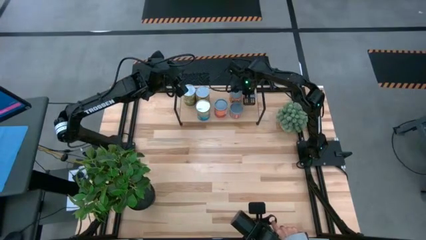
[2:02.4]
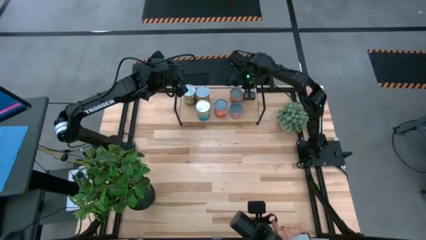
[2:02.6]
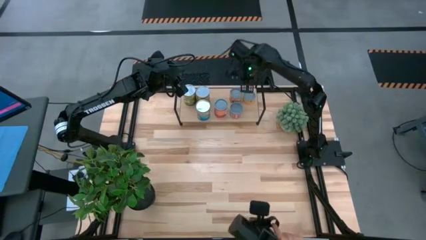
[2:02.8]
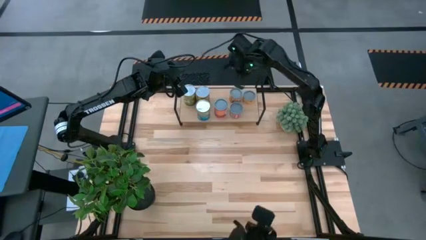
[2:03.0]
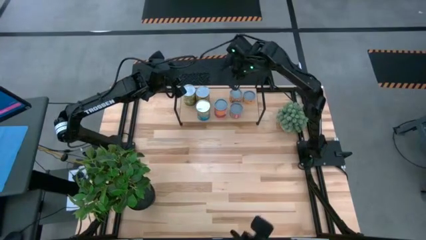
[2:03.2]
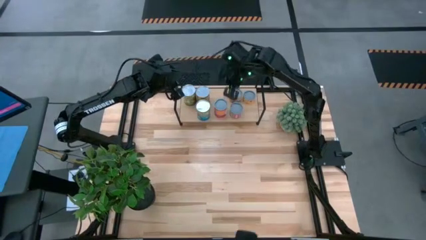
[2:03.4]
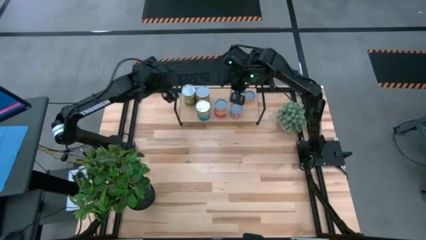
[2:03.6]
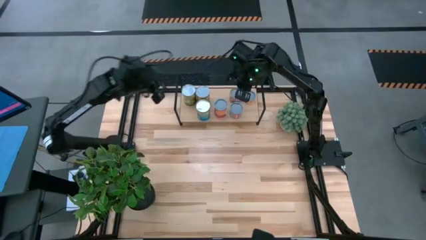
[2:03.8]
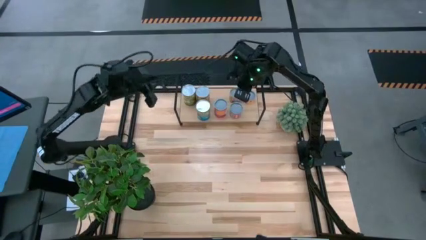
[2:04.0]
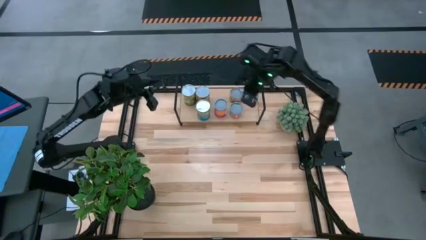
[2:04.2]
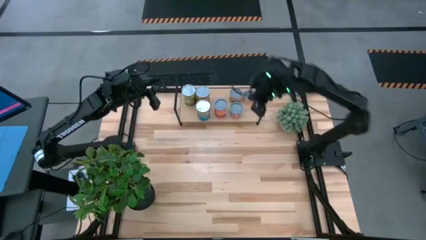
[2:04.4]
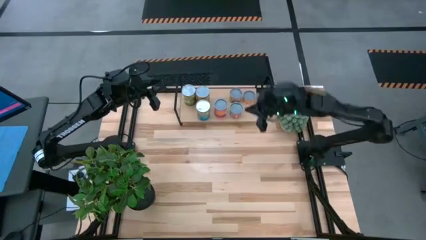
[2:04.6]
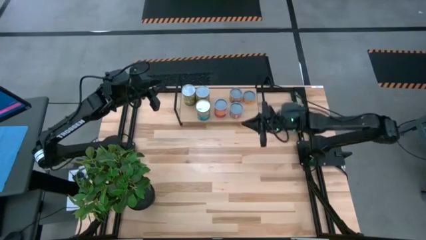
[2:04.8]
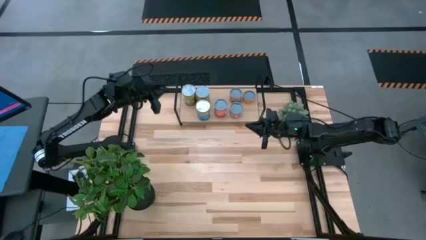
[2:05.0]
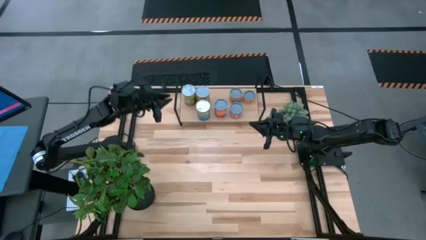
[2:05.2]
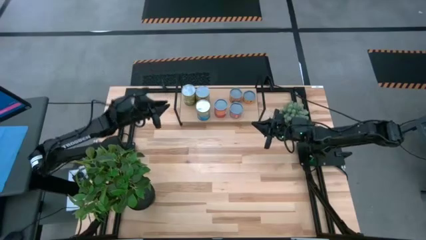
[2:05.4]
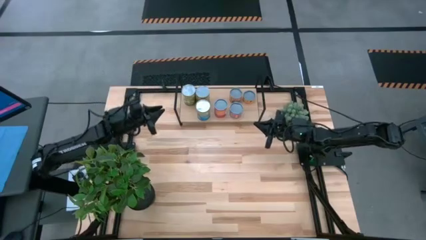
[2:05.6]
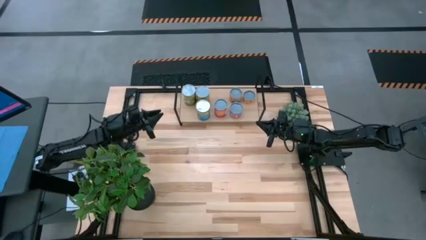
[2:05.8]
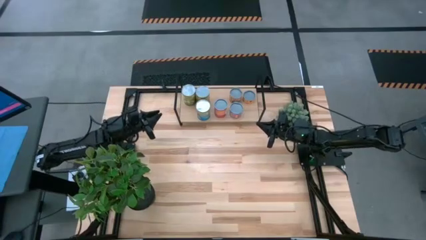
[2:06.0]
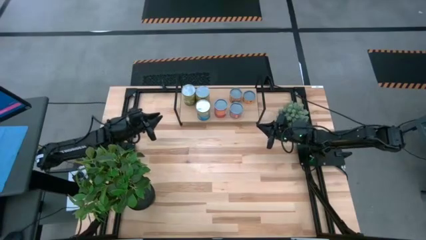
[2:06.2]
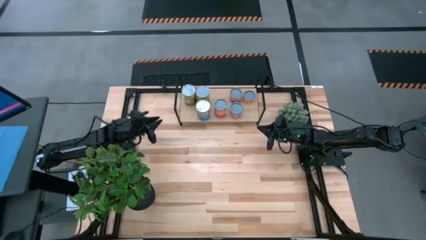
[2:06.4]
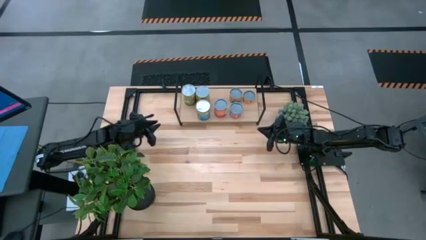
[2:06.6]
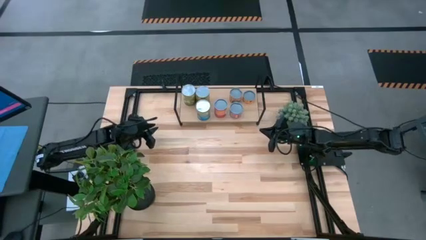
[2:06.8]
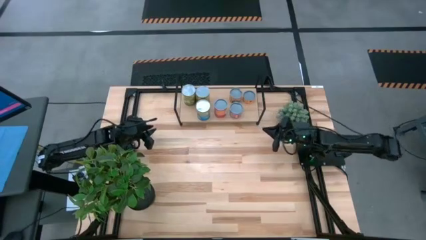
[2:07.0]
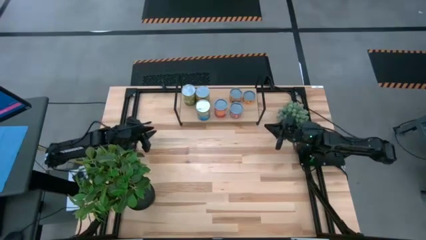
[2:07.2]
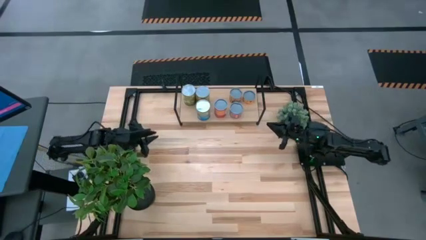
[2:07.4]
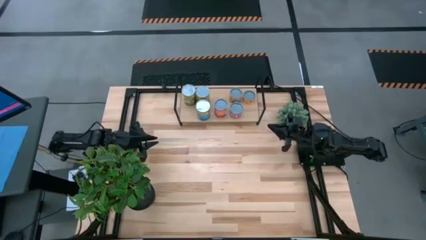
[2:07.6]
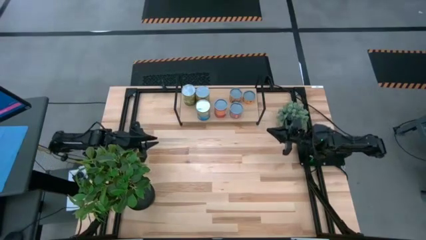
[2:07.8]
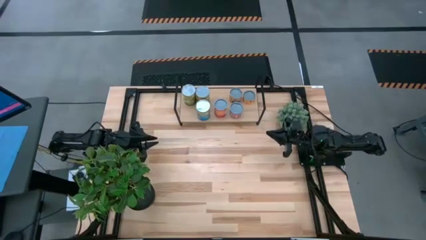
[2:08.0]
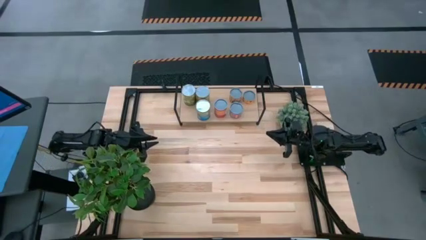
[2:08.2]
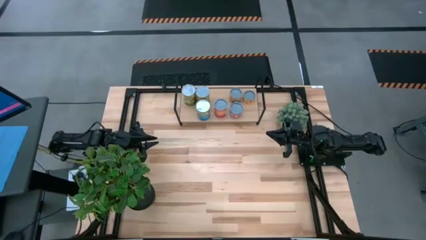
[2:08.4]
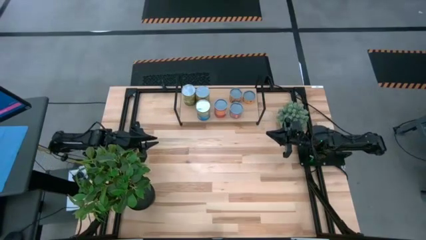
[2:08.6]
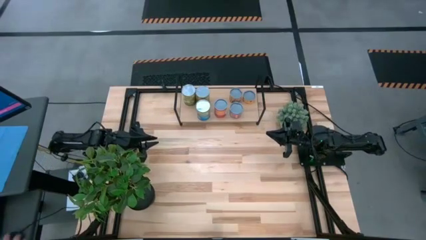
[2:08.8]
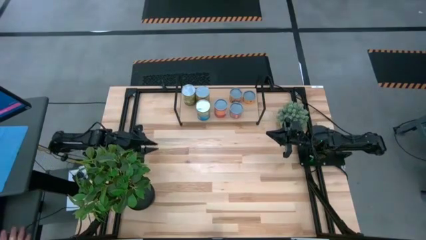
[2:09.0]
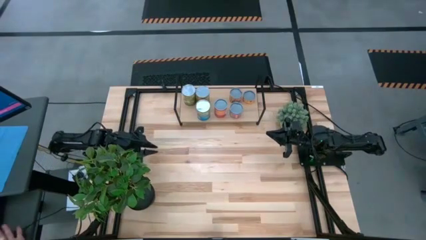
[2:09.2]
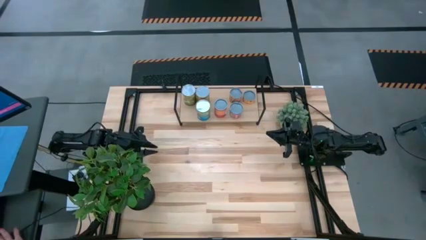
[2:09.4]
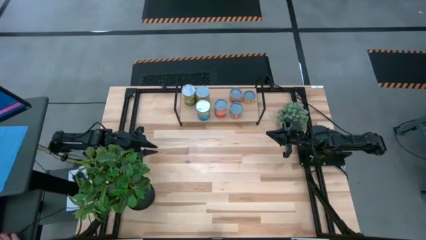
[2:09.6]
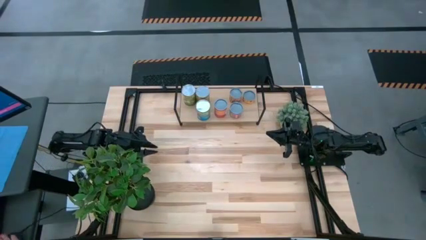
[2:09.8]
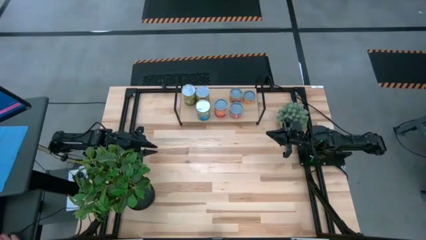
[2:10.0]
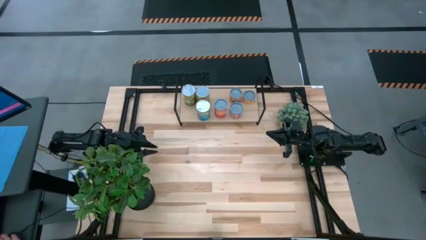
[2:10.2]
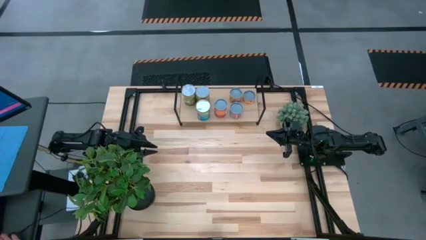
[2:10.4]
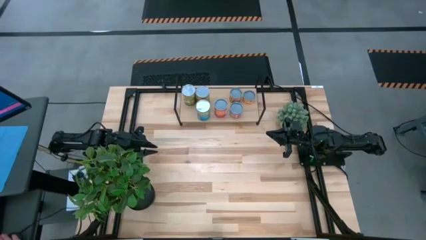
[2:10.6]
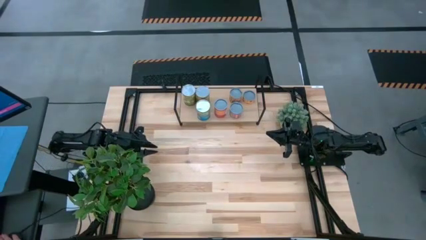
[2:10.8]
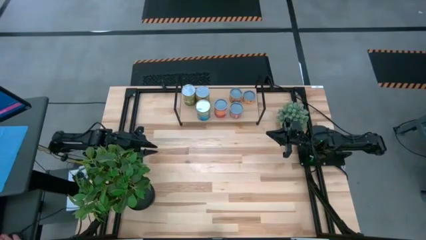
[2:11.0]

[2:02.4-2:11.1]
Task: Pick and place cans onto a shelf
Return to Home Position

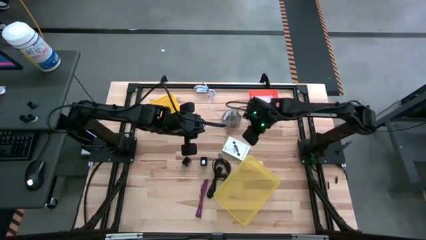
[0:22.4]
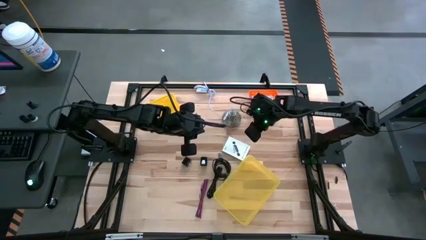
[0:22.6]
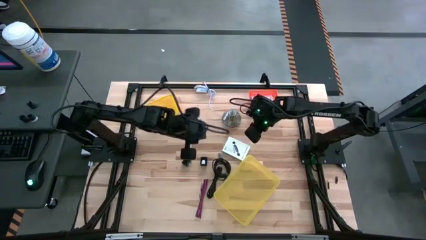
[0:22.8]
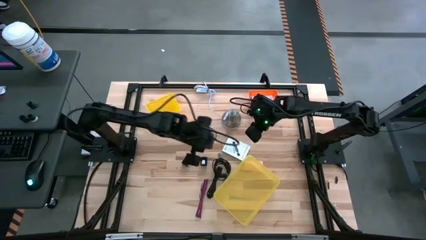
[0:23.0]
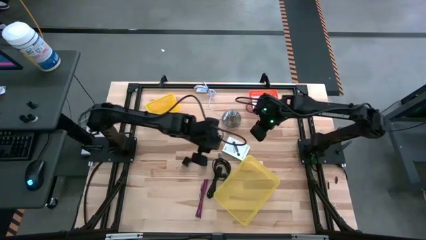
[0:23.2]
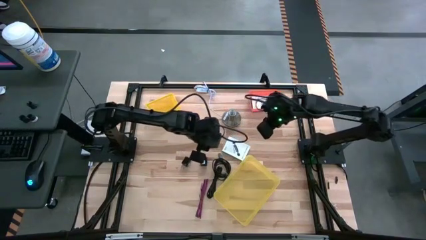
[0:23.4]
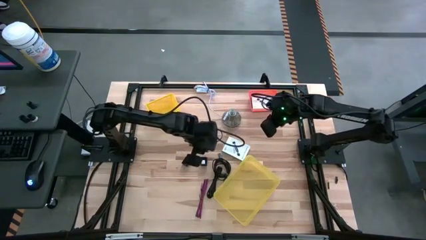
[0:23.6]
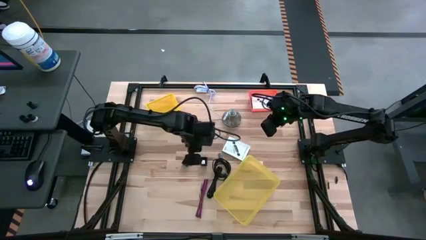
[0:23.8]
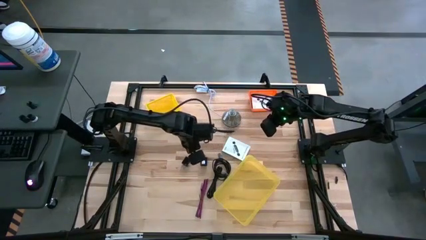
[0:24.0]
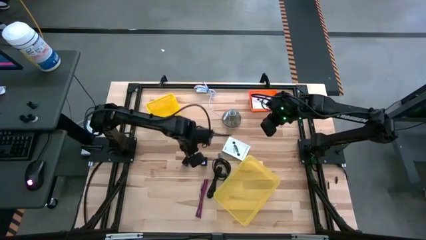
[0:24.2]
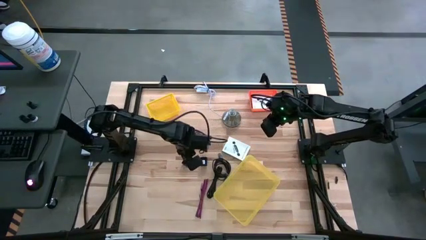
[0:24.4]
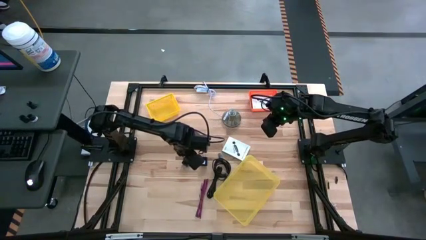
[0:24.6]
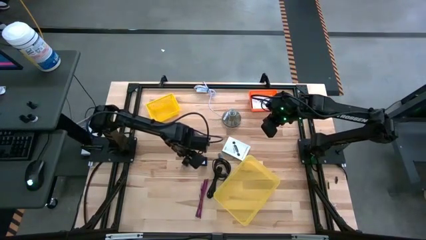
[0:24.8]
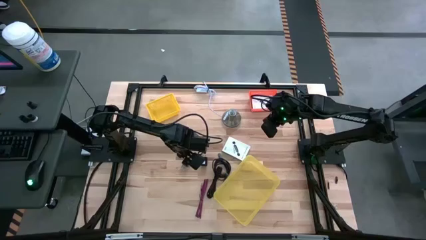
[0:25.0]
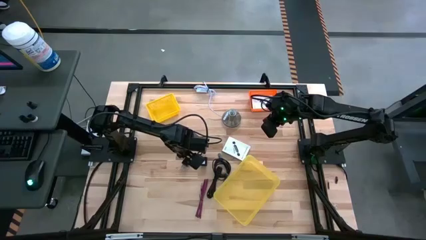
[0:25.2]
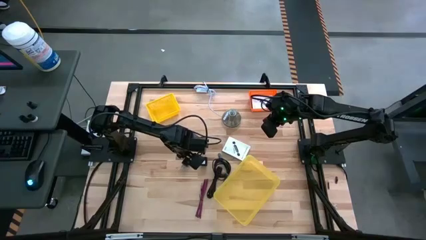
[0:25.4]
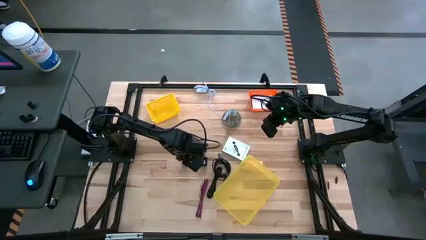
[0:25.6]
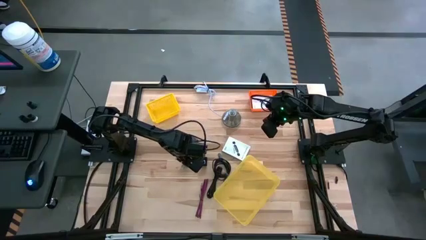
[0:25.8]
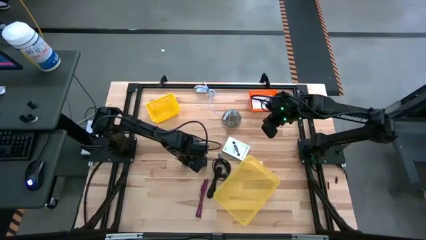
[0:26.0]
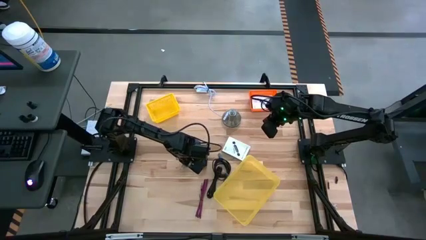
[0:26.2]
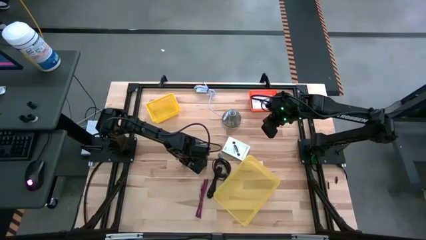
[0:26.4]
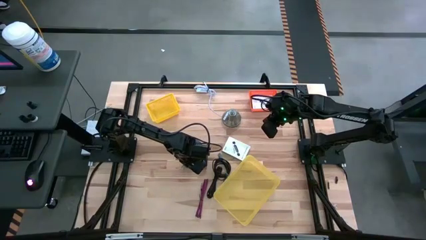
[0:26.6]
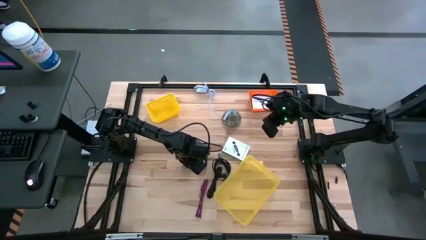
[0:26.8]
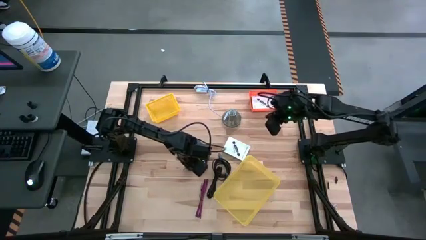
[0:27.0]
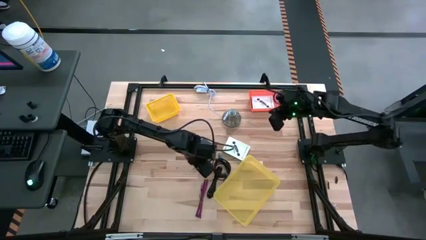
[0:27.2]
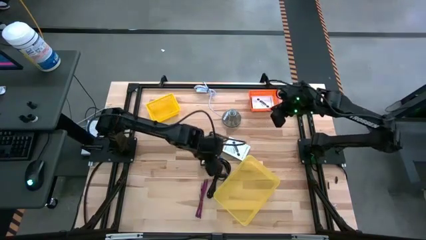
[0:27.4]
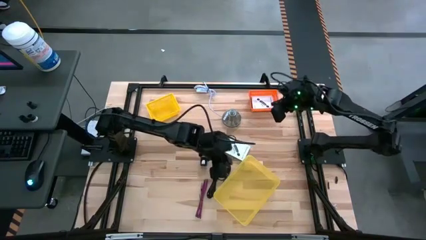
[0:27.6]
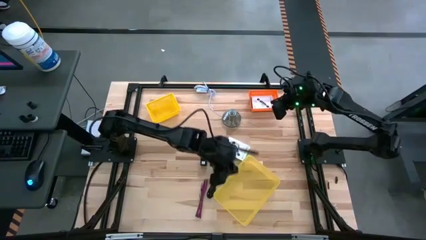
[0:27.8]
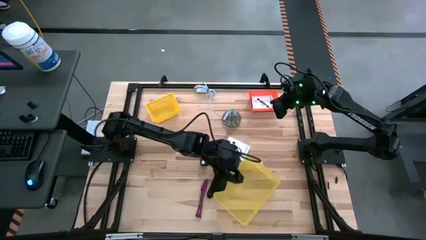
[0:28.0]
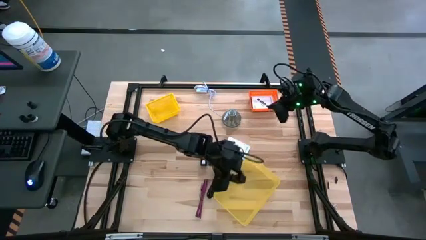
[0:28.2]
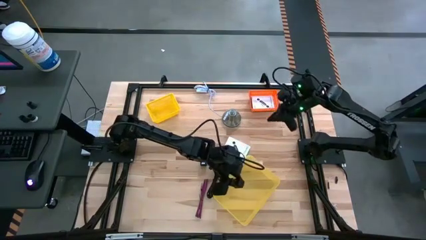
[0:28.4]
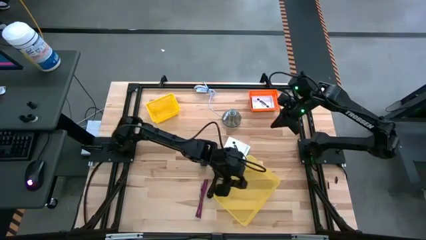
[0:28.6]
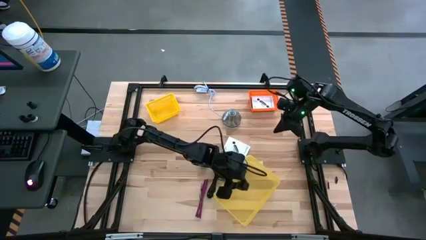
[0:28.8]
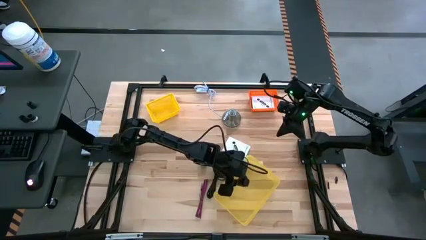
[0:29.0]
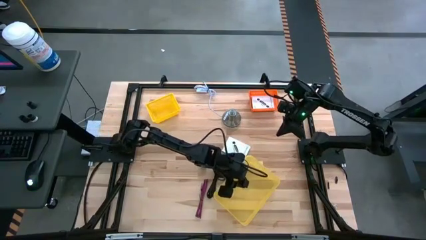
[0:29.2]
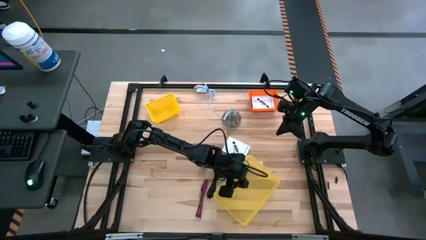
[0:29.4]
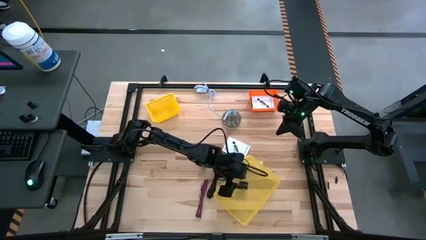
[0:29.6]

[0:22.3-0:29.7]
Task: Pick and place items into bin
Put the left black adapter into the yellow transparent bin
